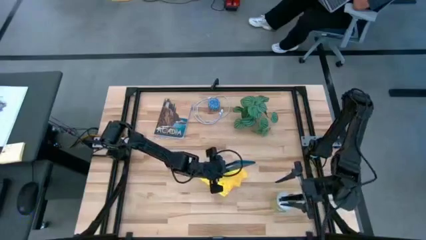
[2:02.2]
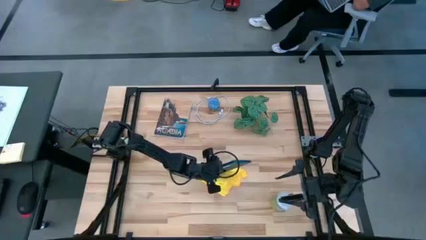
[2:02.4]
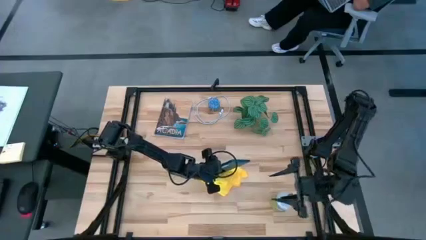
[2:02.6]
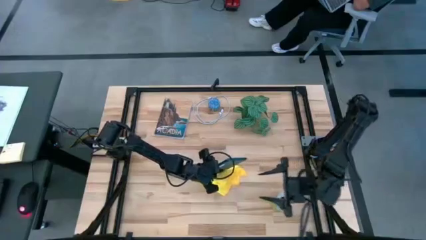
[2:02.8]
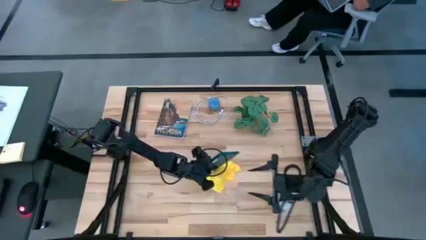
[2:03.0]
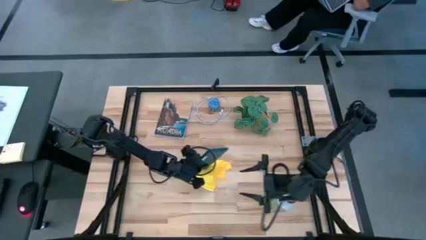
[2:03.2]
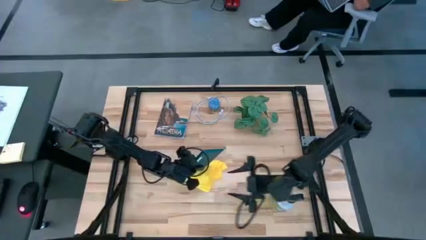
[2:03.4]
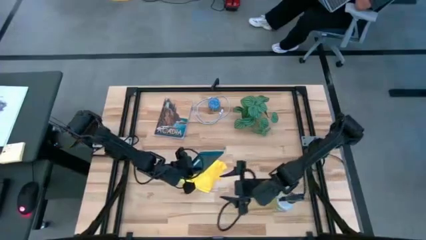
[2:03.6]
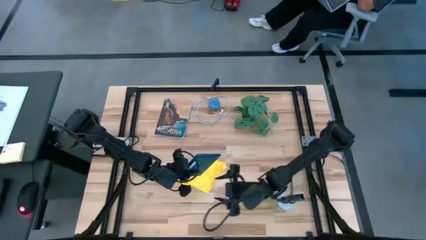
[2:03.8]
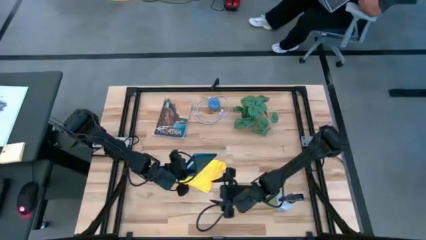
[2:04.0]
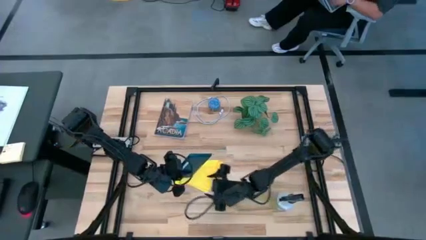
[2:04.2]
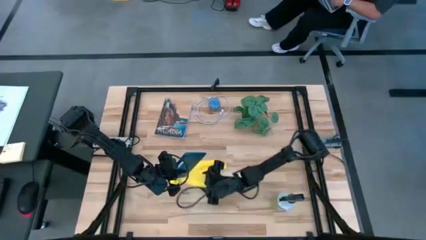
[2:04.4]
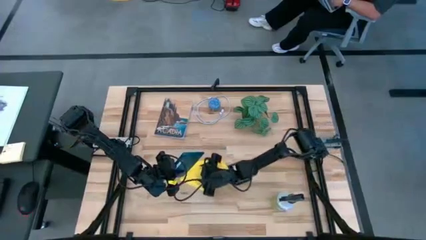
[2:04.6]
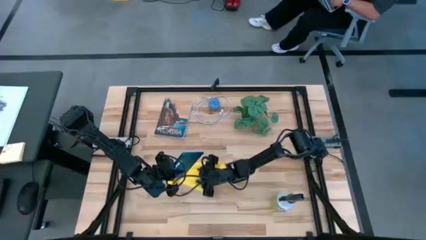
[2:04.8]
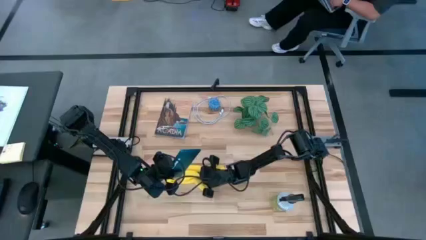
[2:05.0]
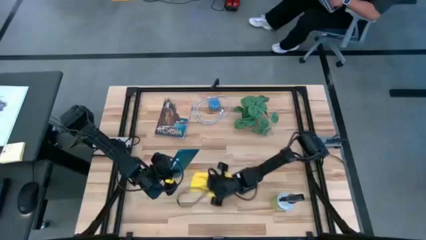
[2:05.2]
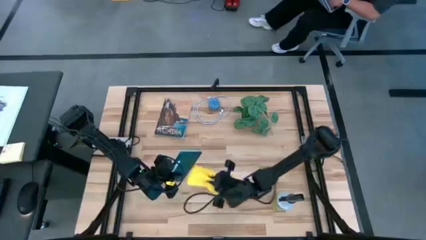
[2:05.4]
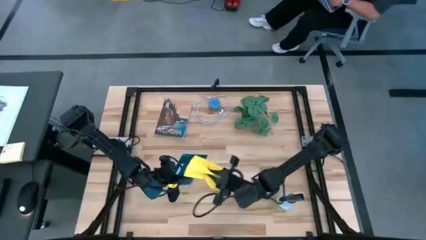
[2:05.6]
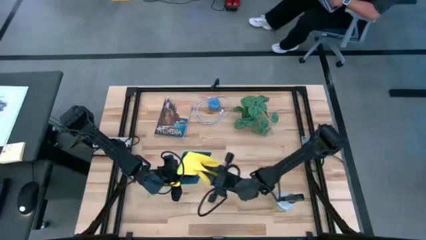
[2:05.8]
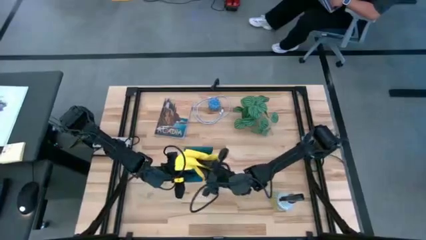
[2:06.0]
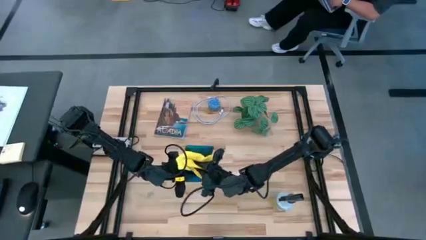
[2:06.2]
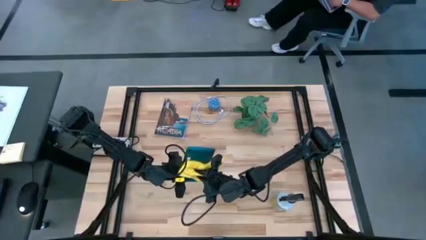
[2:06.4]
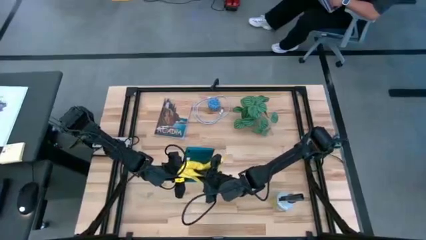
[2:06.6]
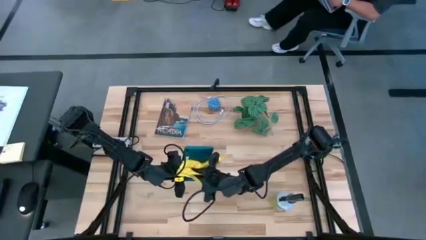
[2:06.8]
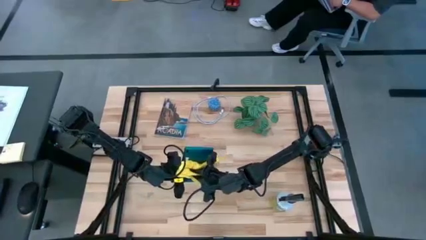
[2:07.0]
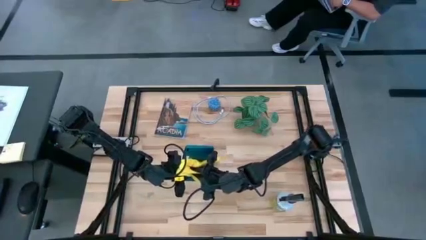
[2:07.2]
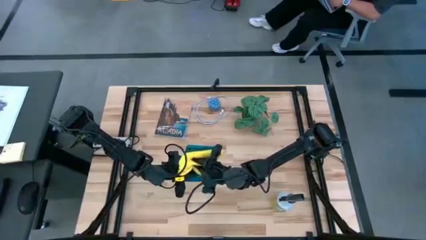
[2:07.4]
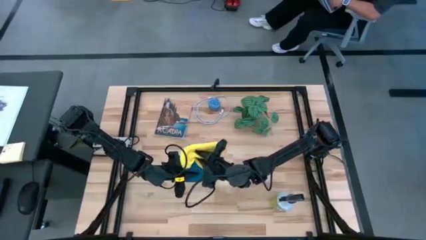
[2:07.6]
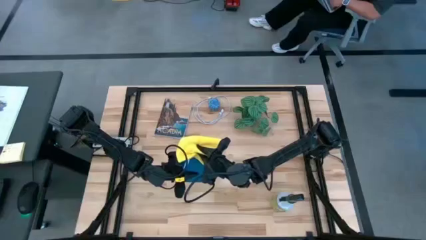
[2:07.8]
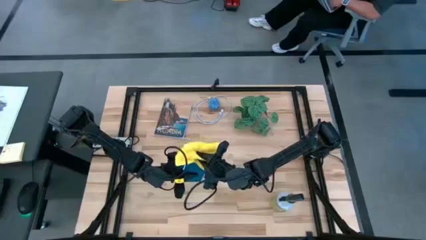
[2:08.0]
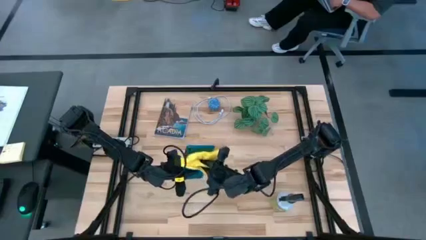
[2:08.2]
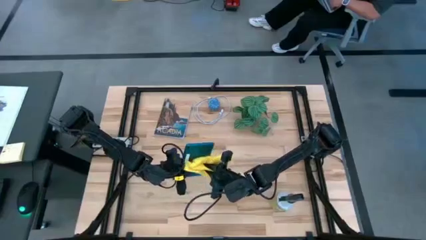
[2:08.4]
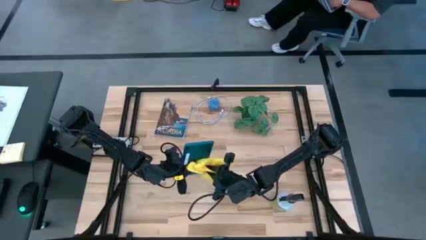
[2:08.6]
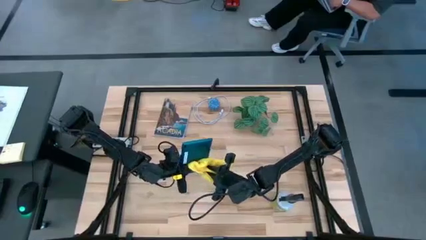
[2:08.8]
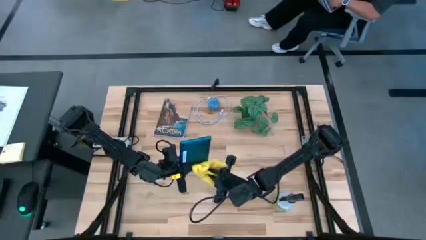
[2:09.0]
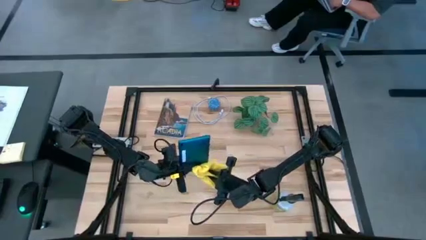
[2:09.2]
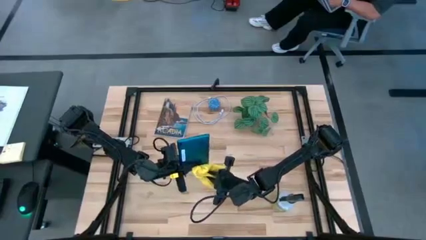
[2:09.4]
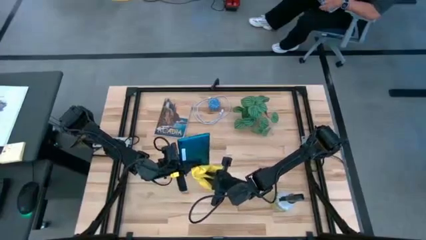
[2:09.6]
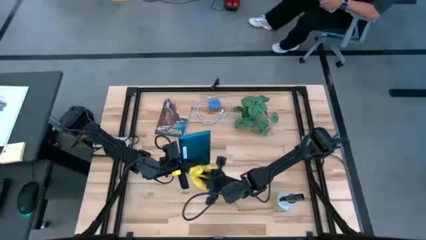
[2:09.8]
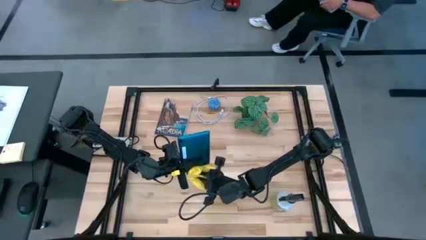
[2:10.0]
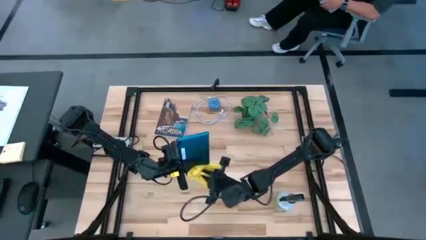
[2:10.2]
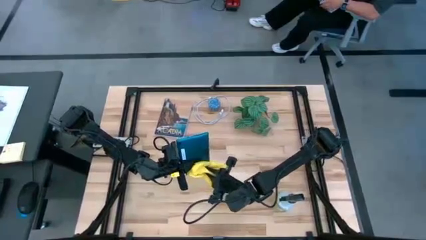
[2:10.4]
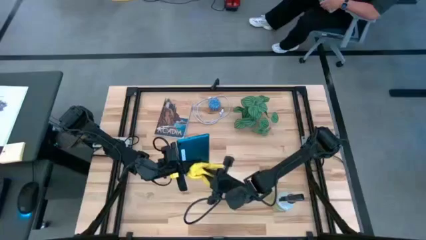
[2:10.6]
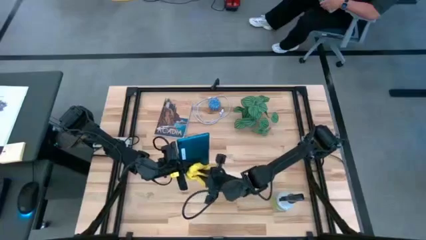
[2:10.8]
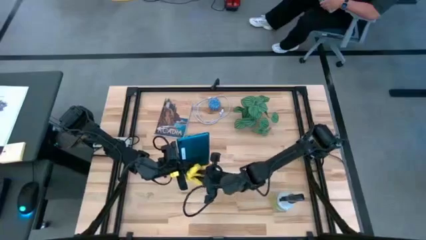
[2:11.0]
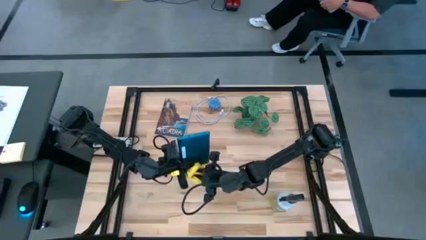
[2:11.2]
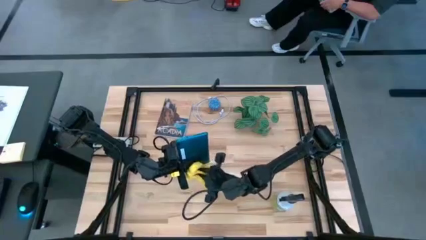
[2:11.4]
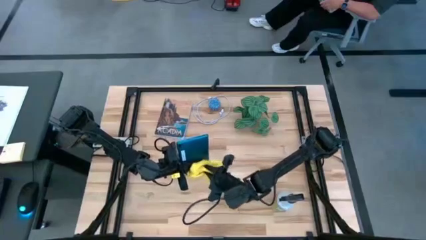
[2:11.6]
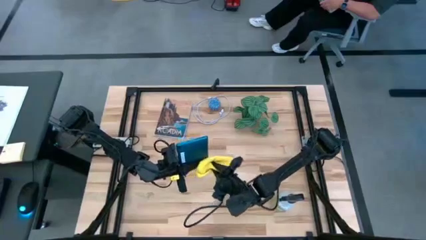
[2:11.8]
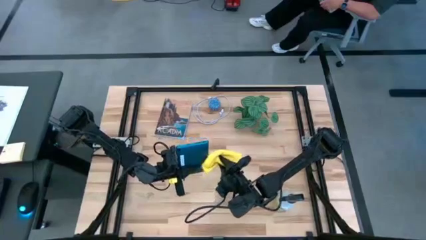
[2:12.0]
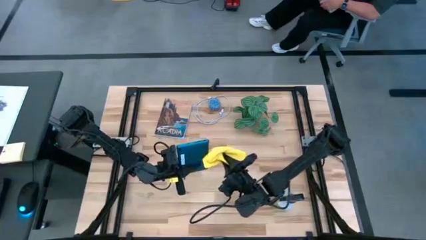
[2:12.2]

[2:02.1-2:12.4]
Task: Clean tablet
Wipe the back of the tablet using microfiber towel

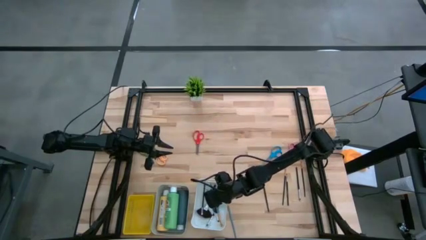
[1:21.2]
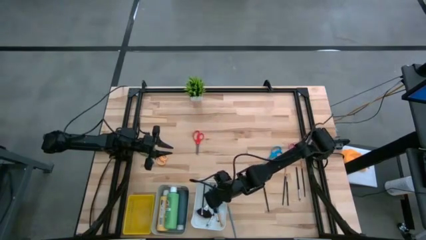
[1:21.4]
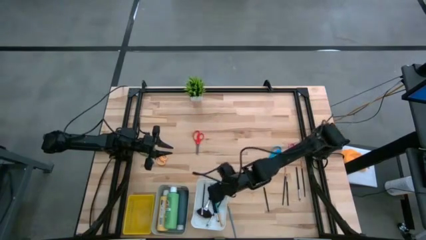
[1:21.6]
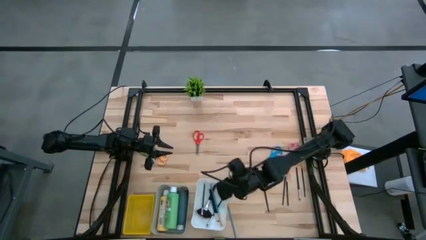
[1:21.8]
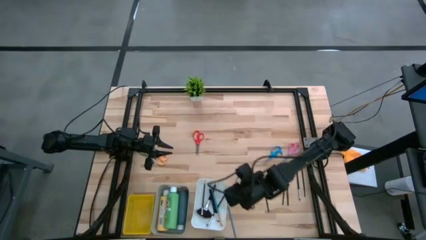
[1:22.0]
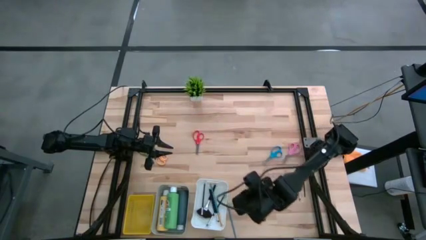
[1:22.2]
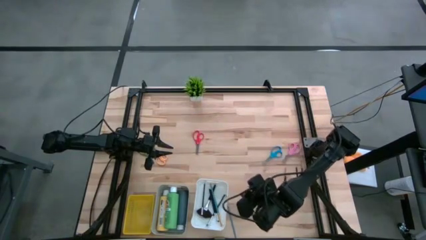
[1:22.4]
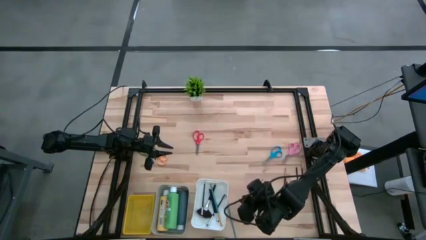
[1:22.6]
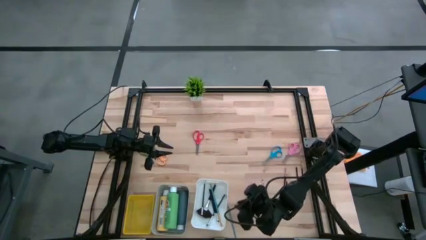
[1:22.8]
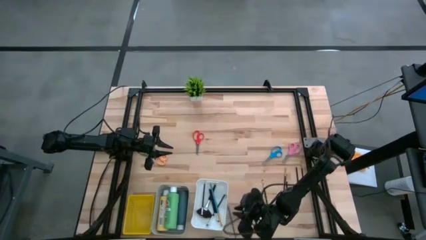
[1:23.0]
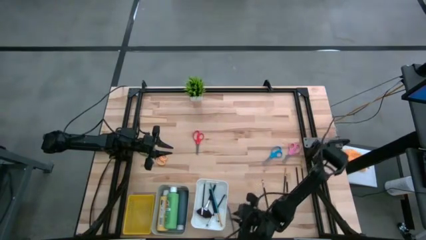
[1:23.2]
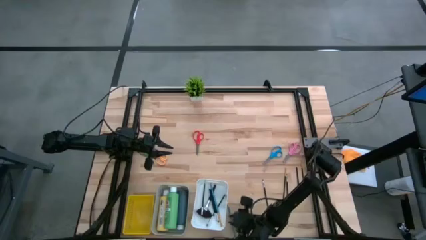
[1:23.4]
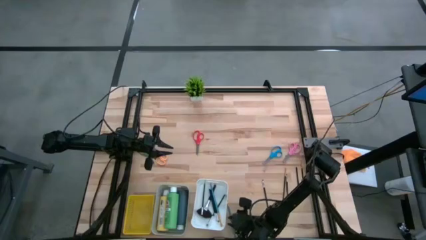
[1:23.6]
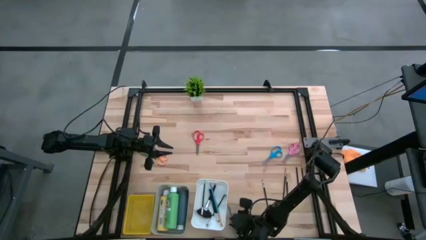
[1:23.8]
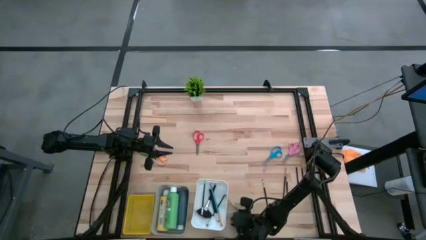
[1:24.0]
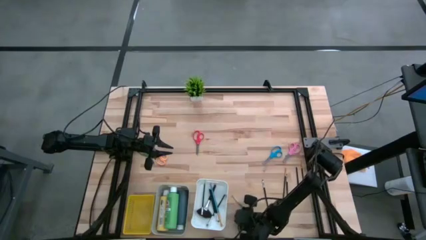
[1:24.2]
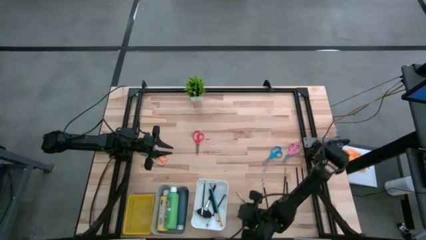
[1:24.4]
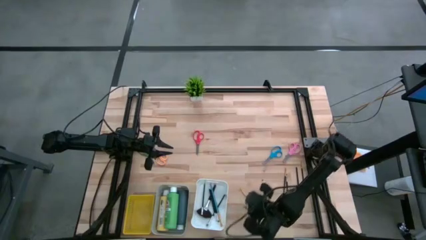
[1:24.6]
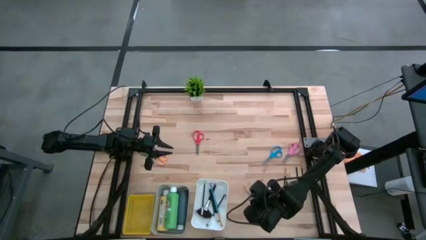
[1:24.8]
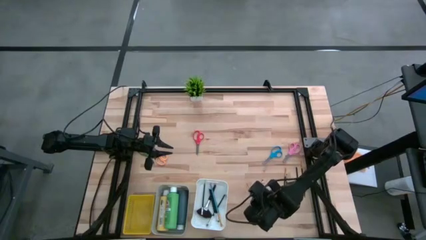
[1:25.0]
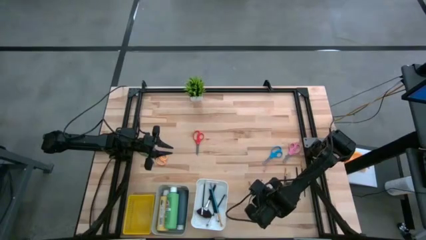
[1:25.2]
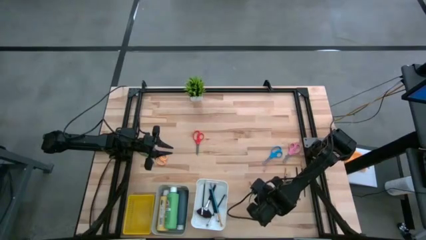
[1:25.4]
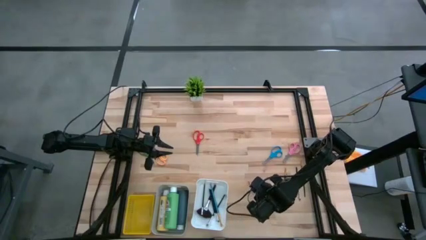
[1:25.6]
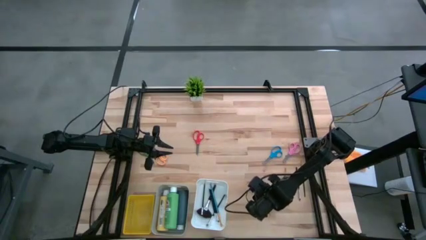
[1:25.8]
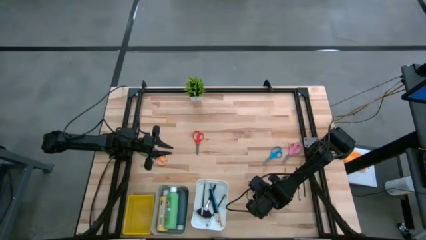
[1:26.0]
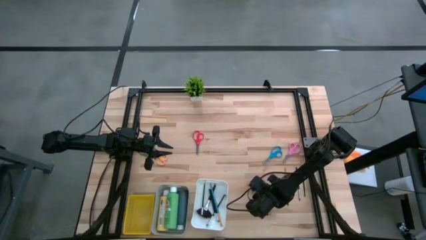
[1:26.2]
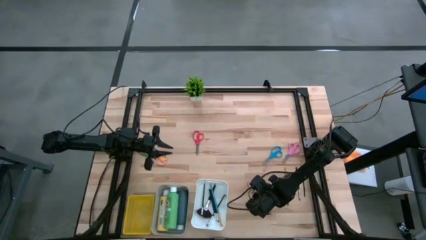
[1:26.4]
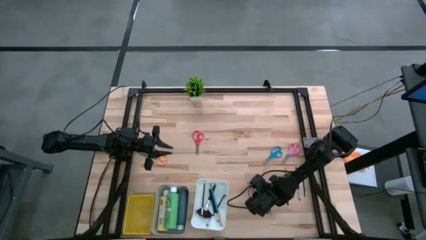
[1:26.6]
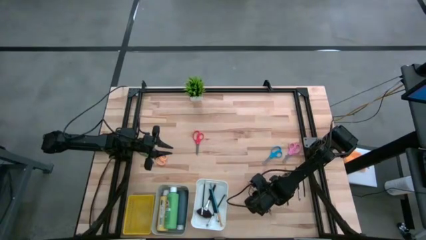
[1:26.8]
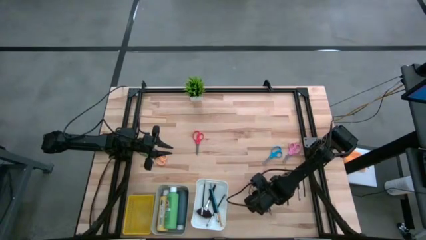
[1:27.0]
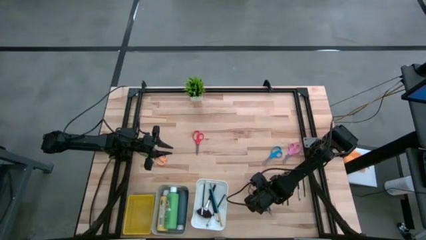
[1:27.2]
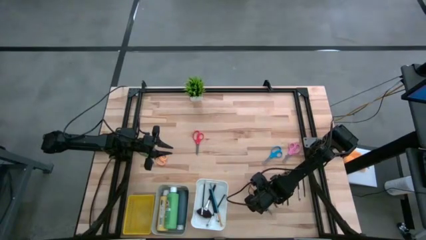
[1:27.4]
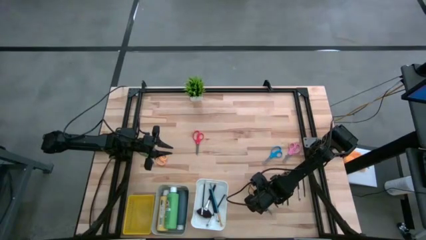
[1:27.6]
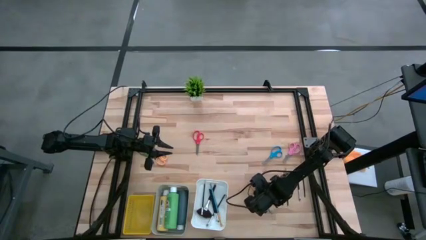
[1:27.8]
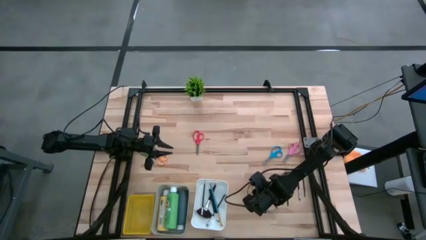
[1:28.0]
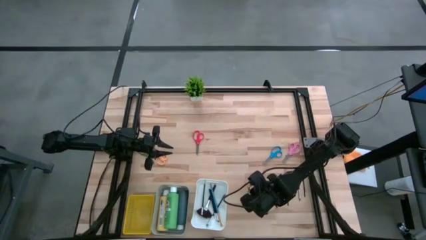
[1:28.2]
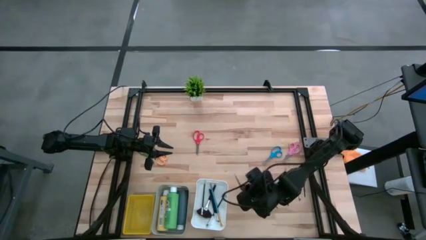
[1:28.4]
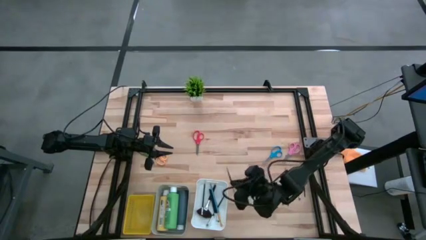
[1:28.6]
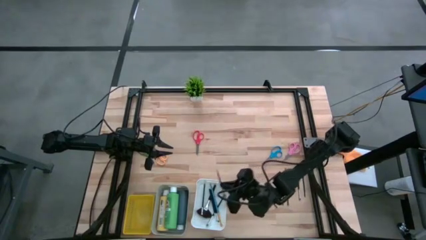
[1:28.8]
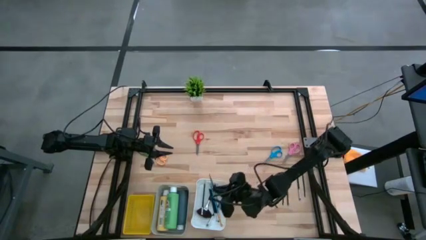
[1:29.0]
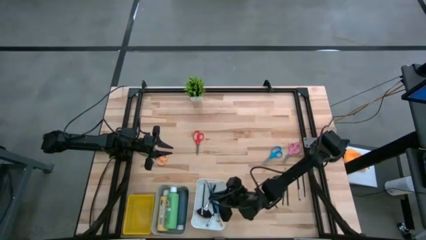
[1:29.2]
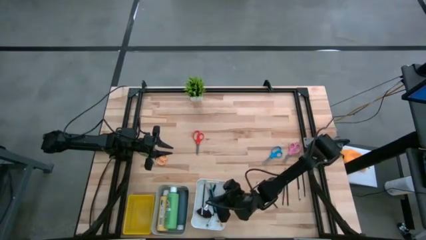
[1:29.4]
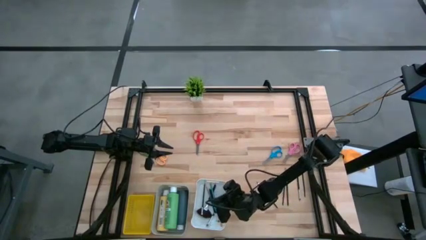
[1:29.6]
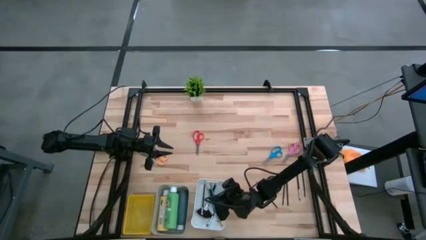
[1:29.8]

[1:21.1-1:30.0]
Task: Pick & Place Paint Supplies
Put the blue paint brush into the white bin
